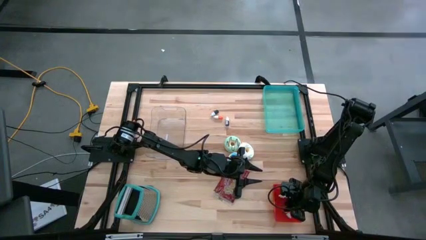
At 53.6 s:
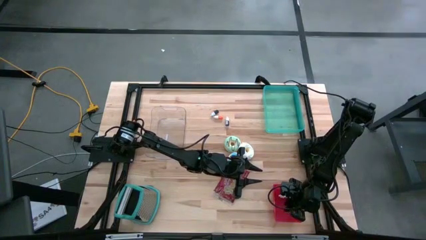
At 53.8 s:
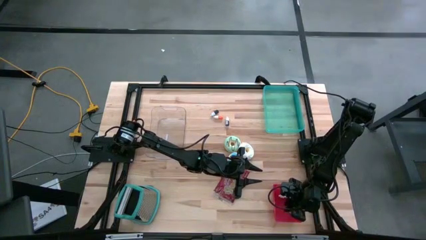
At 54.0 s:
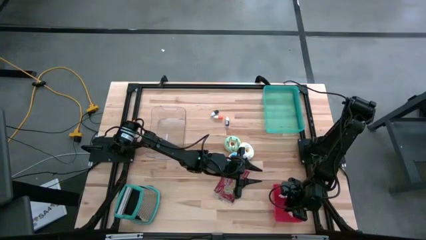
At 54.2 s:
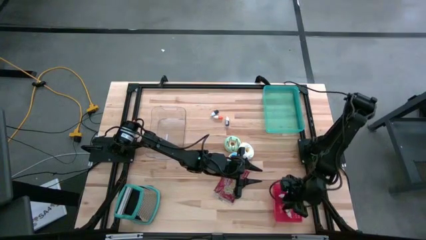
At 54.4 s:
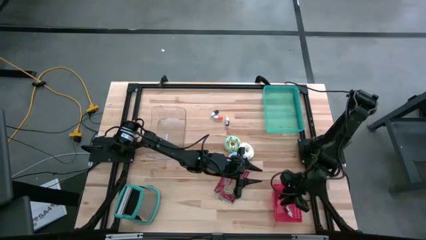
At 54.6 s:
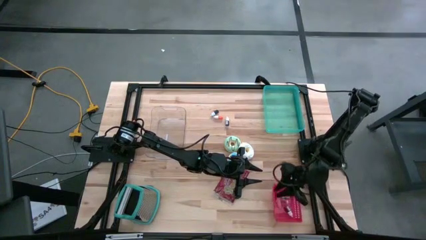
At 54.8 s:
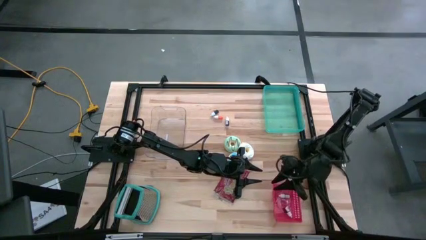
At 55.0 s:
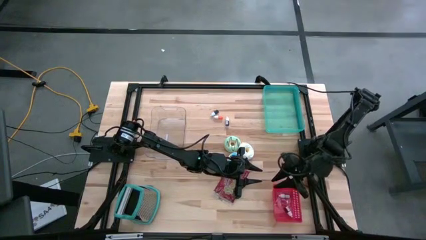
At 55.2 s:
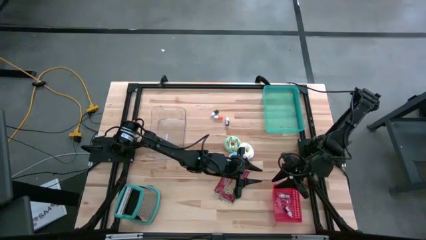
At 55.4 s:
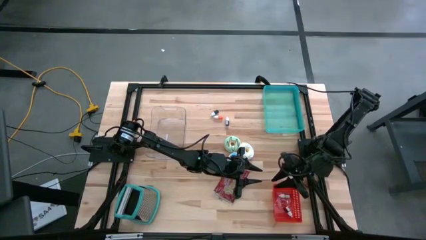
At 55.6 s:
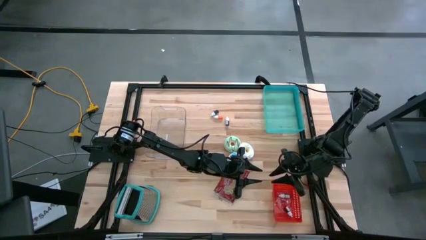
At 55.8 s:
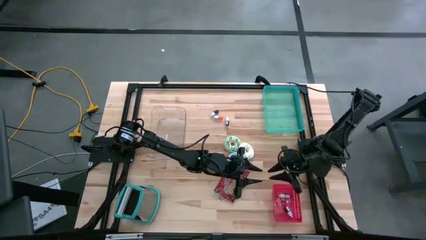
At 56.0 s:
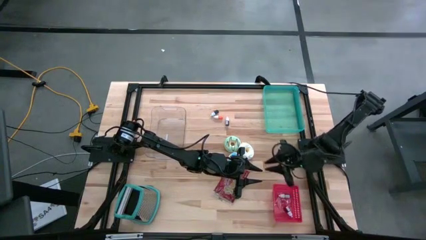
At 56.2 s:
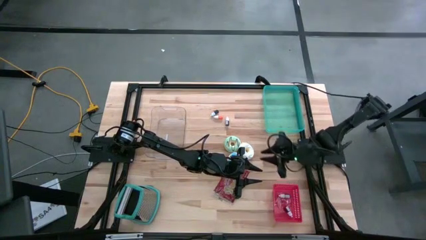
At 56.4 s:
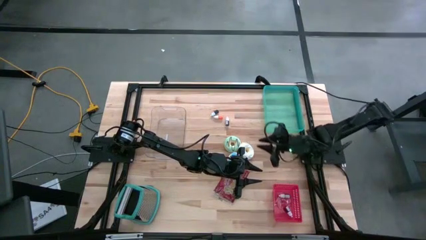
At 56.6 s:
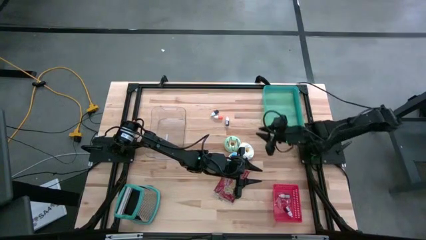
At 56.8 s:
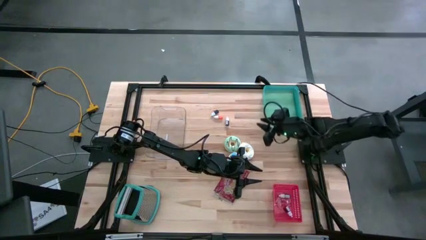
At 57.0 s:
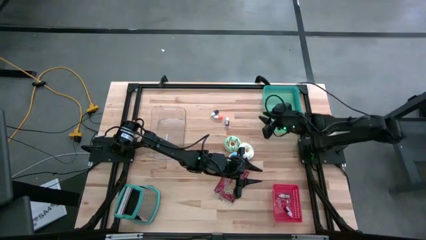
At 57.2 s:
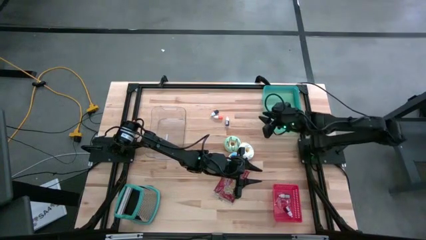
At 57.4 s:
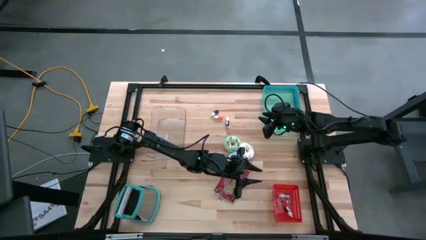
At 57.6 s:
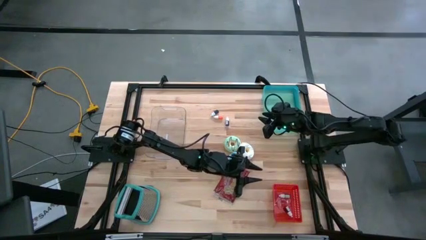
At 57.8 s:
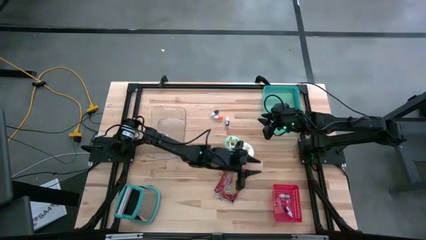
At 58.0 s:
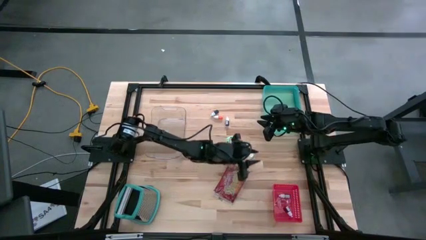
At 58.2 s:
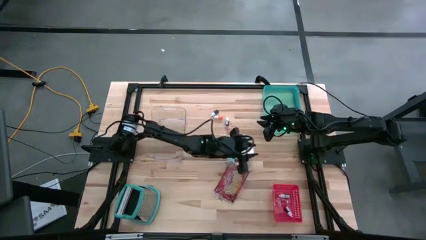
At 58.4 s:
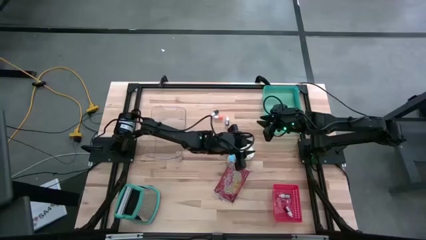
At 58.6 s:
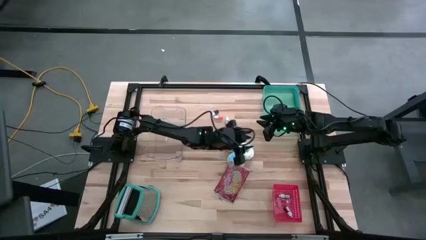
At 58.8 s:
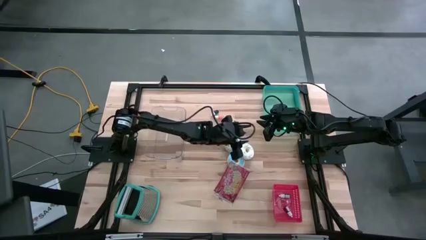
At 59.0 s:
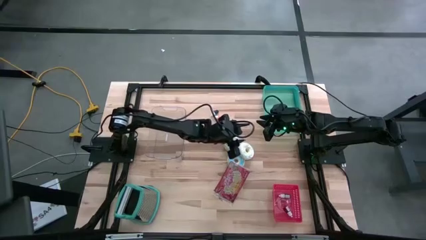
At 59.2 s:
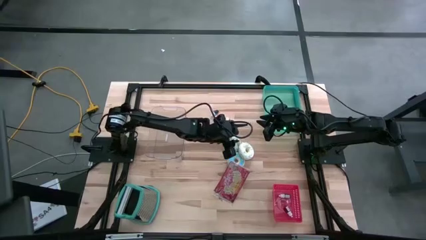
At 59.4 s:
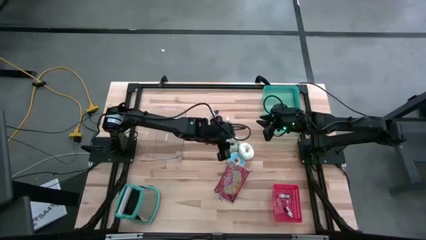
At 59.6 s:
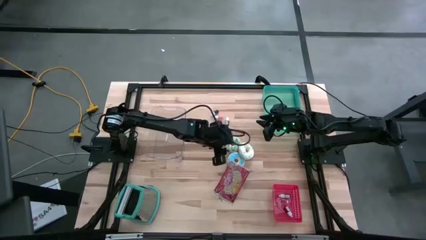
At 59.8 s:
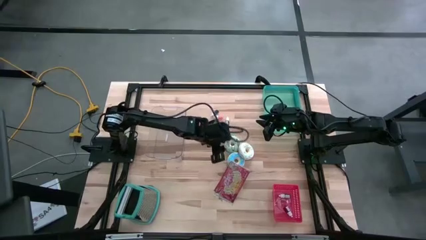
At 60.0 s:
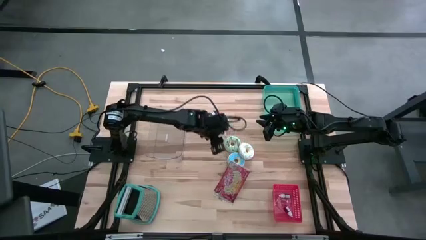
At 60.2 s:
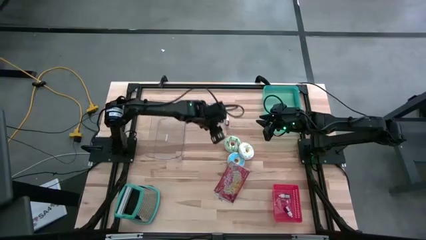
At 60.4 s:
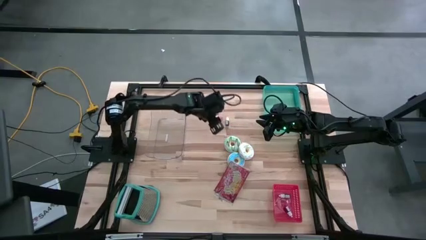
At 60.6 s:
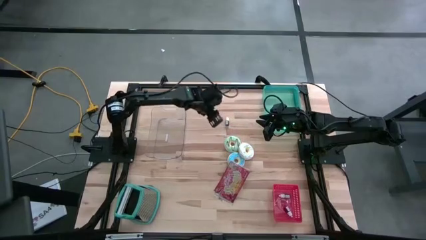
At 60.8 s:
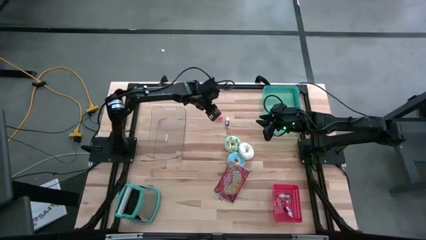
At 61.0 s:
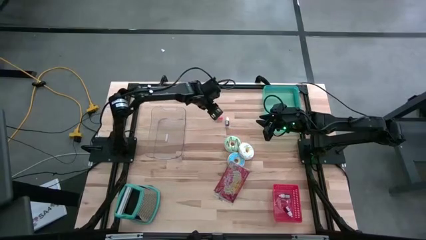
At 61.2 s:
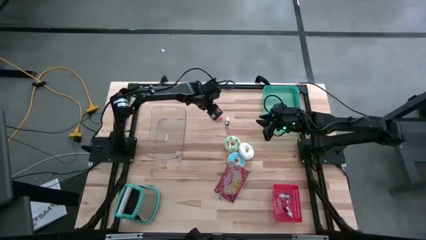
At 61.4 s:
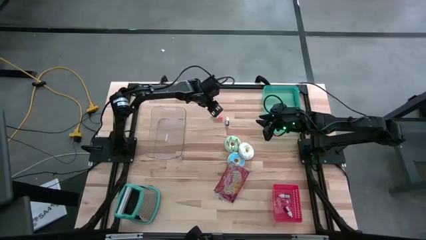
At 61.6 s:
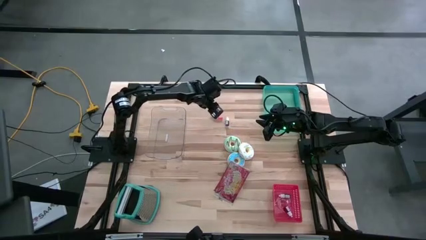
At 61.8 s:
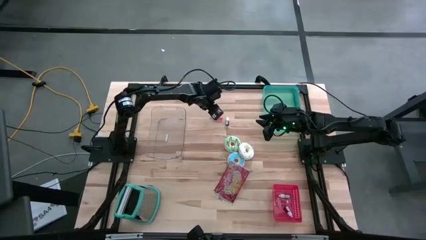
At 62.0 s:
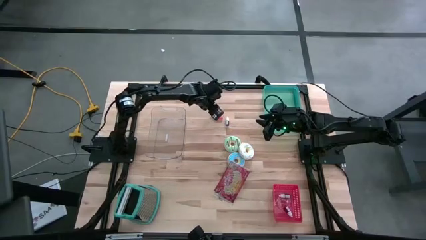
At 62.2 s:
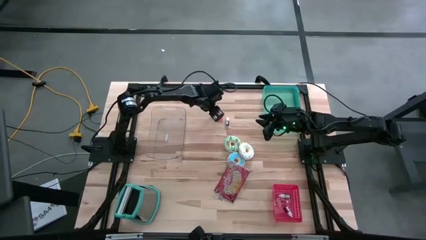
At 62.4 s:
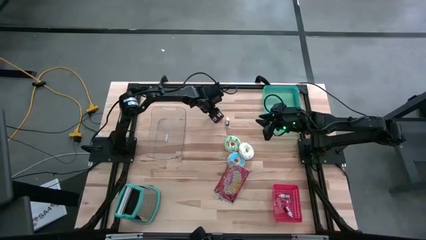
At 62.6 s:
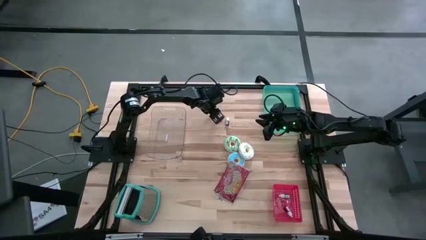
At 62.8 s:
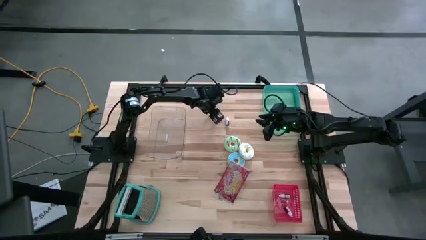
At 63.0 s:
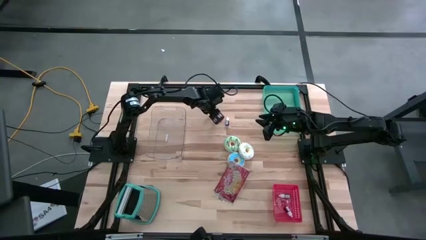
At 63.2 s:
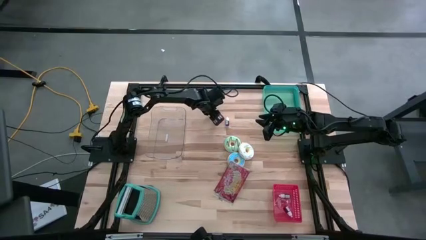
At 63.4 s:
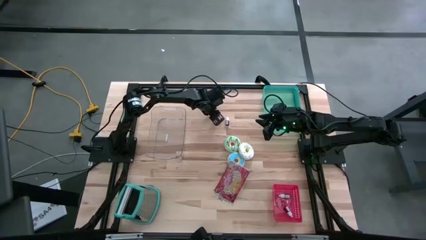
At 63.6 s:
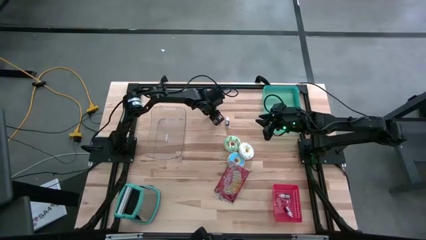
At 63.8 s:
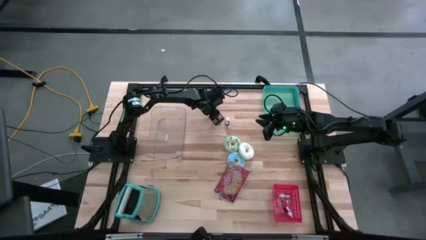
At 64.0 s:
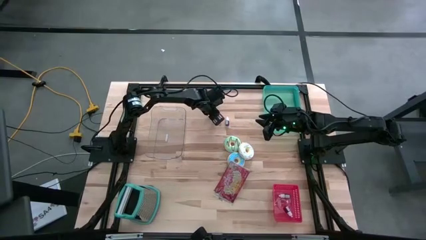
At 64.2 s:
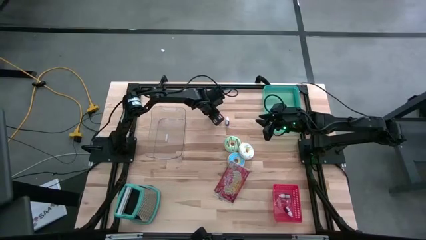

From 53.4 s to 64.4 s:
Put the blue food coloring bottle into the red bin
